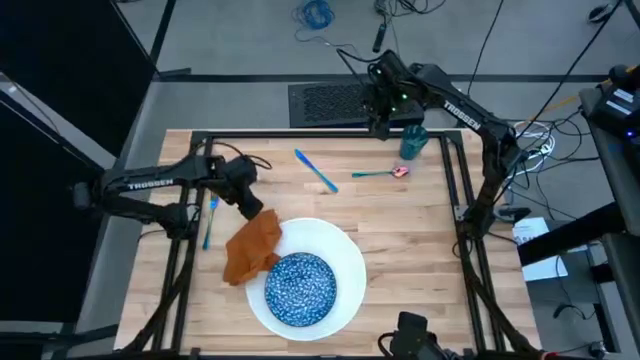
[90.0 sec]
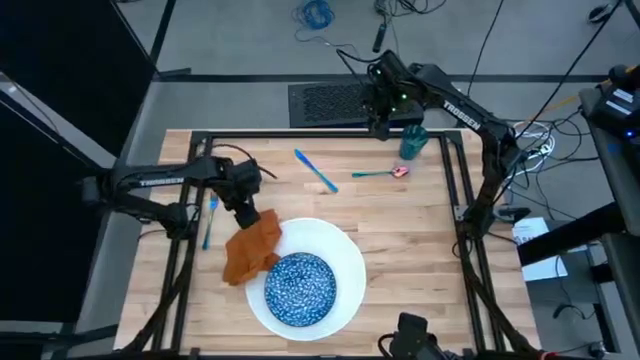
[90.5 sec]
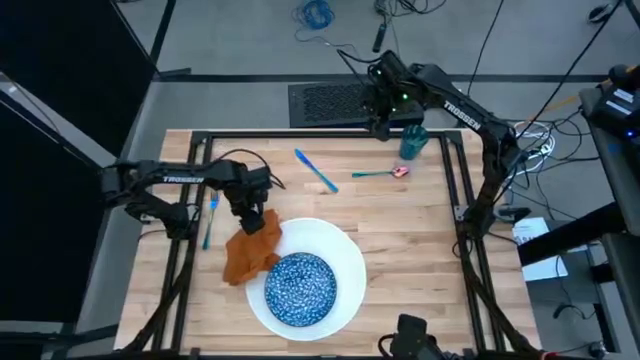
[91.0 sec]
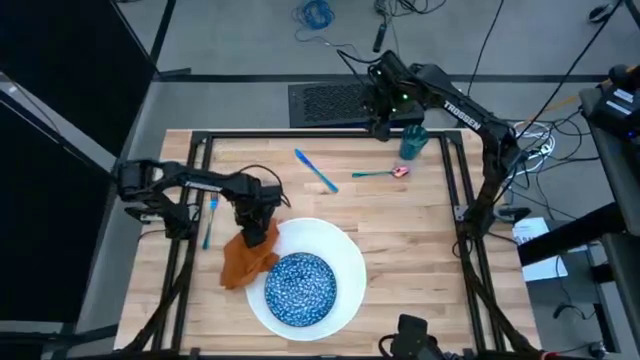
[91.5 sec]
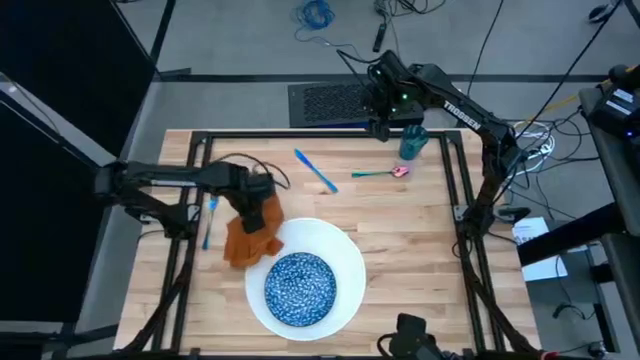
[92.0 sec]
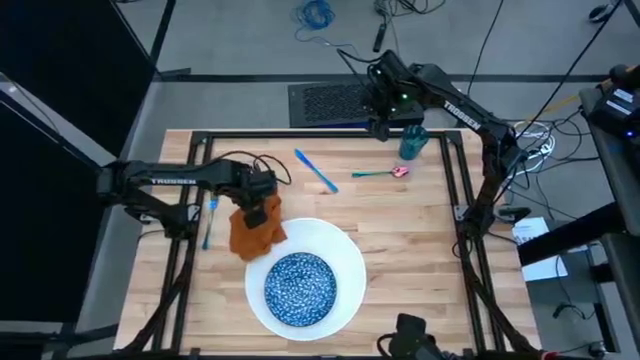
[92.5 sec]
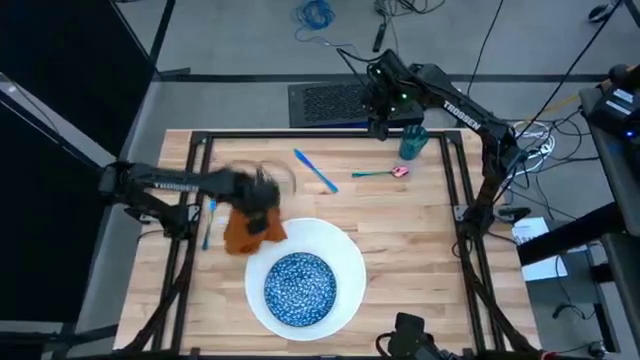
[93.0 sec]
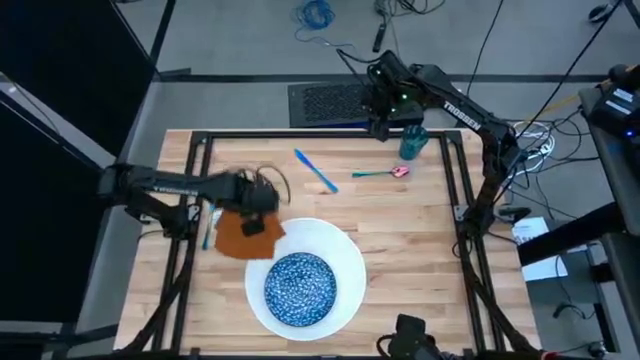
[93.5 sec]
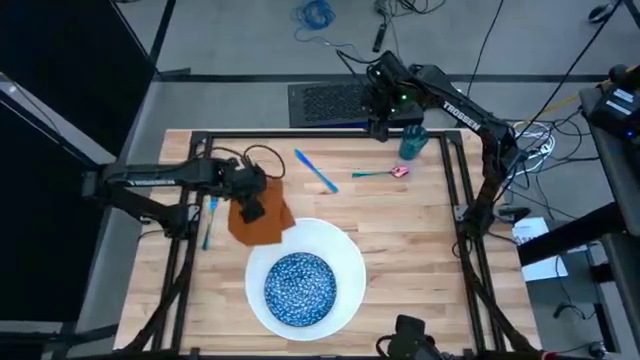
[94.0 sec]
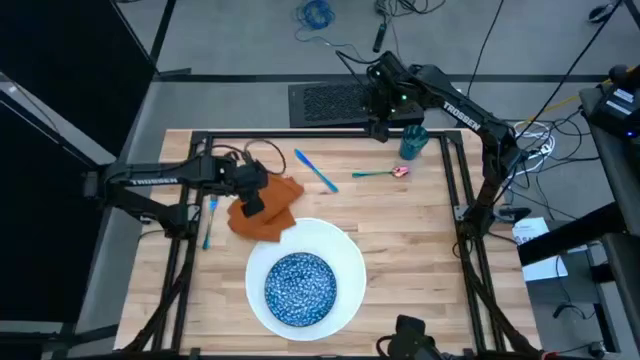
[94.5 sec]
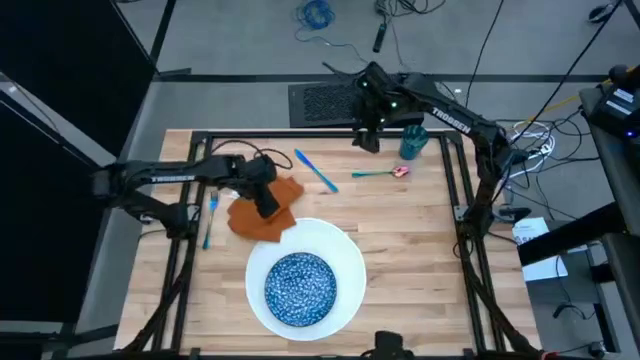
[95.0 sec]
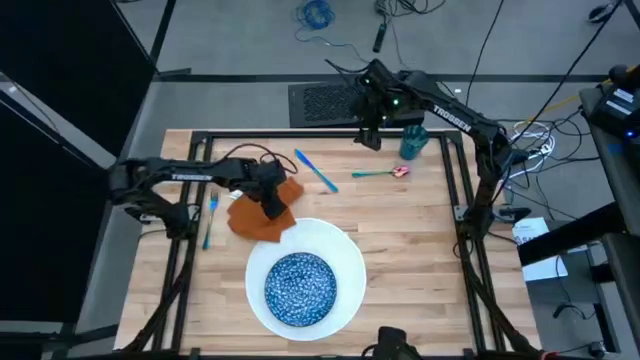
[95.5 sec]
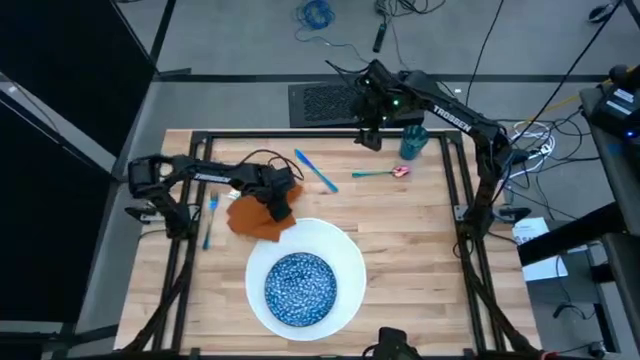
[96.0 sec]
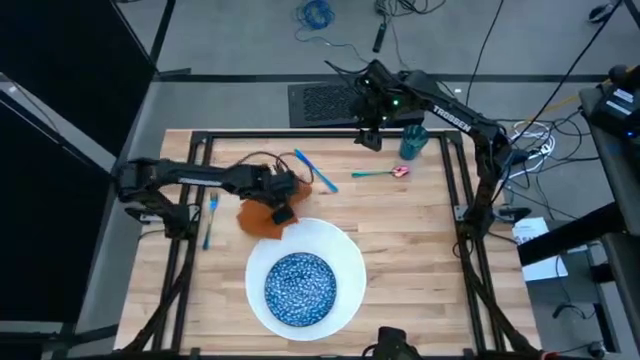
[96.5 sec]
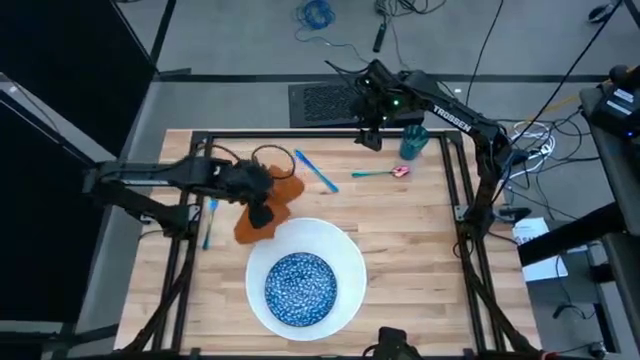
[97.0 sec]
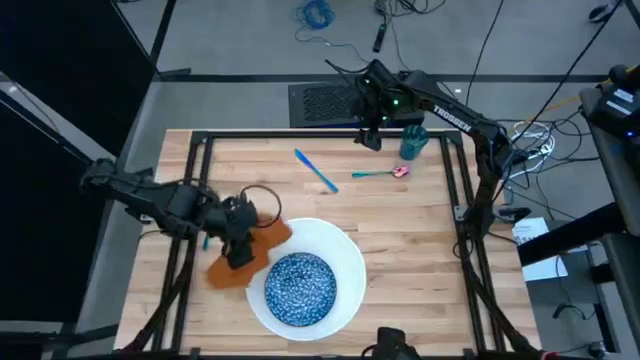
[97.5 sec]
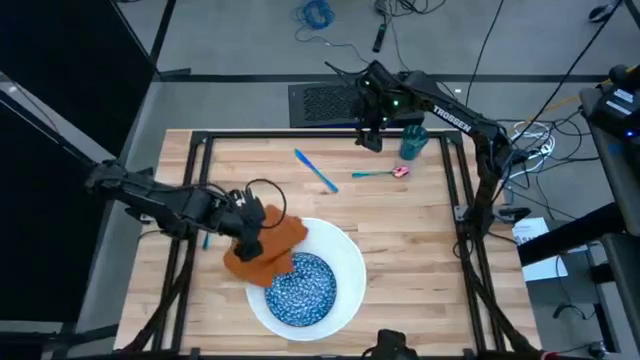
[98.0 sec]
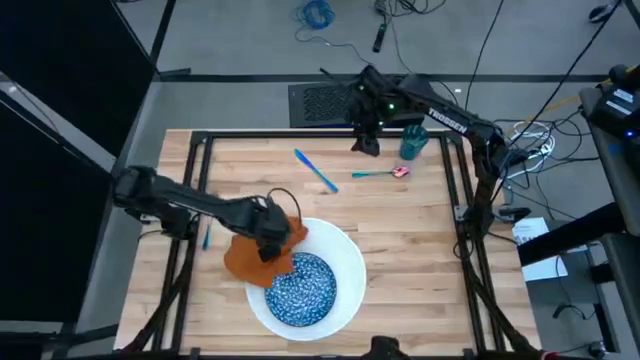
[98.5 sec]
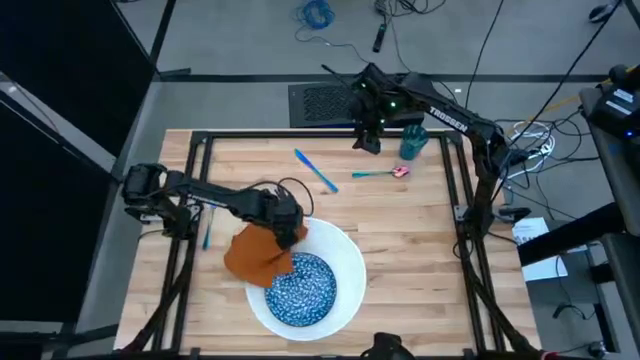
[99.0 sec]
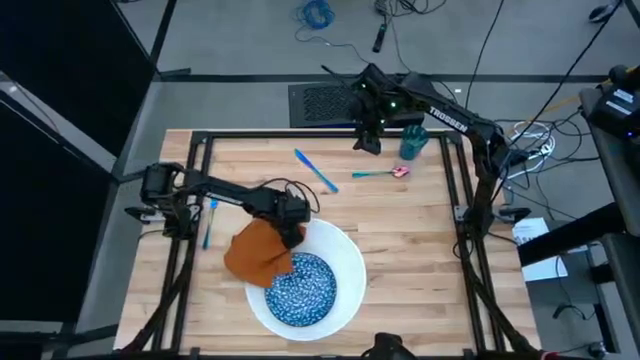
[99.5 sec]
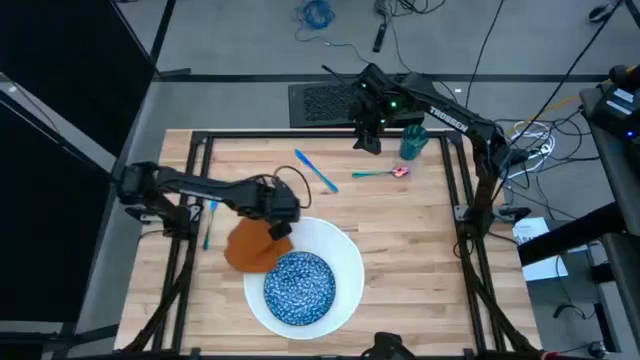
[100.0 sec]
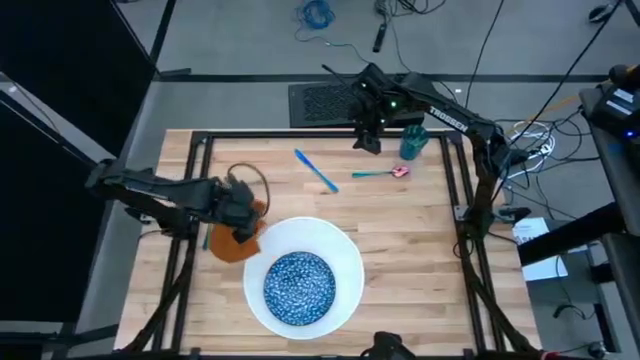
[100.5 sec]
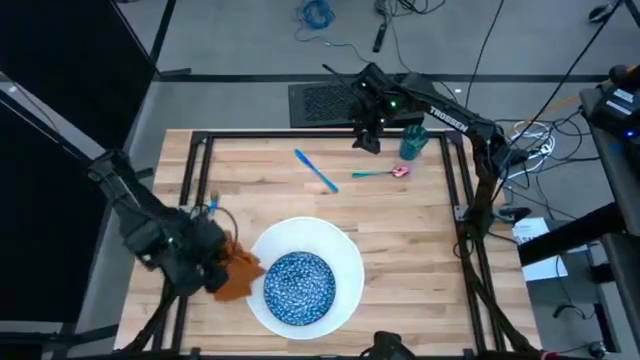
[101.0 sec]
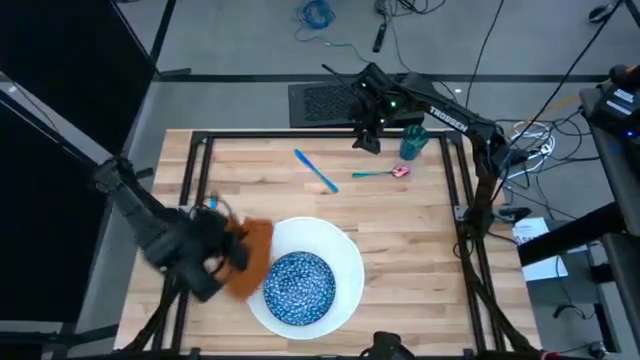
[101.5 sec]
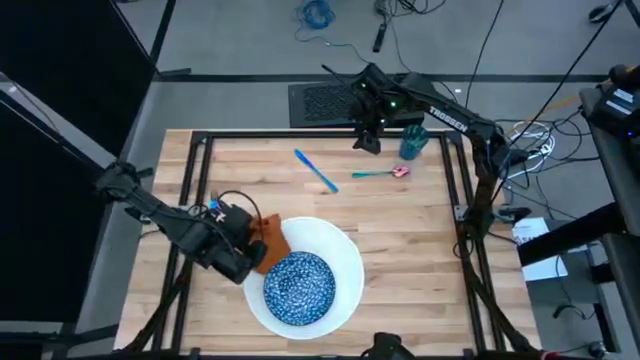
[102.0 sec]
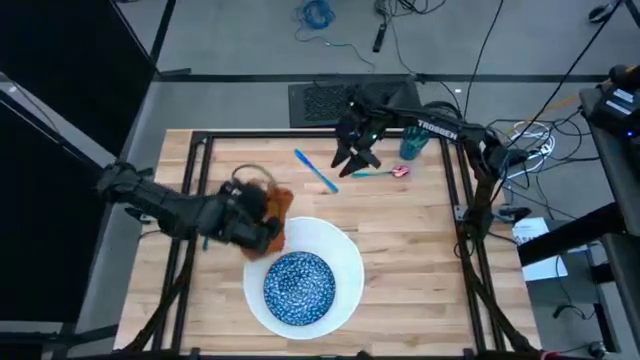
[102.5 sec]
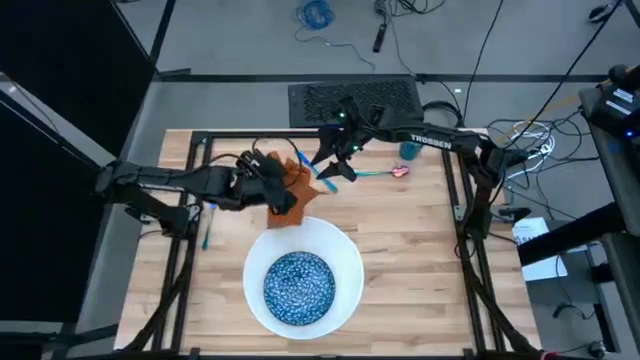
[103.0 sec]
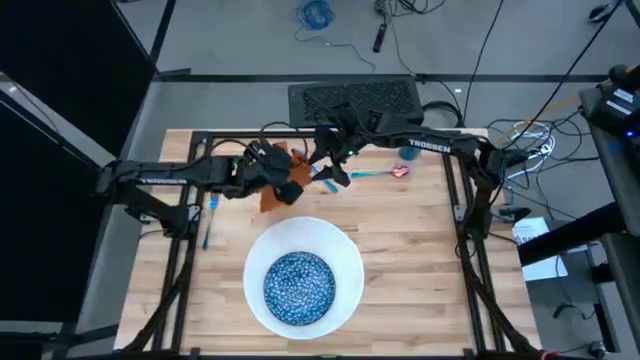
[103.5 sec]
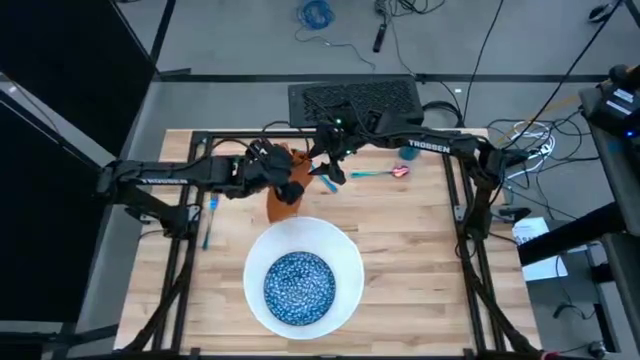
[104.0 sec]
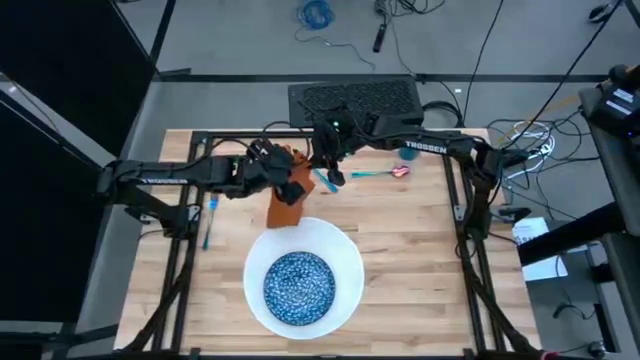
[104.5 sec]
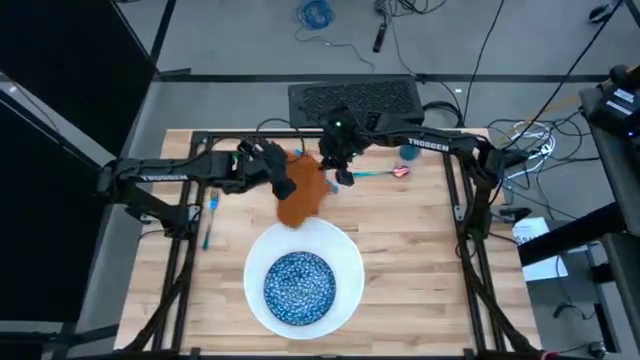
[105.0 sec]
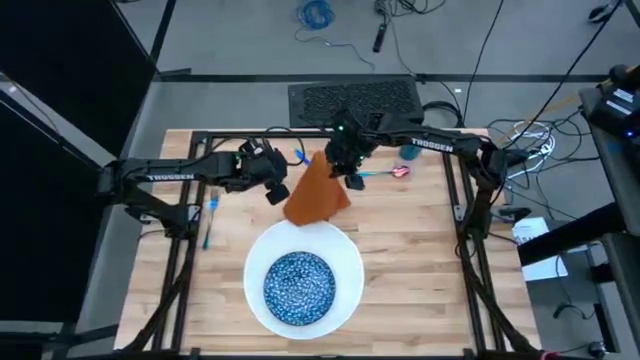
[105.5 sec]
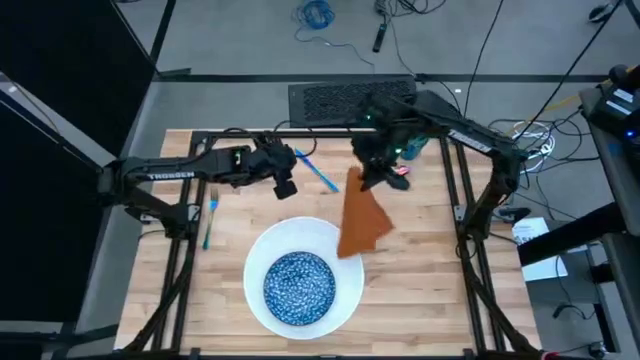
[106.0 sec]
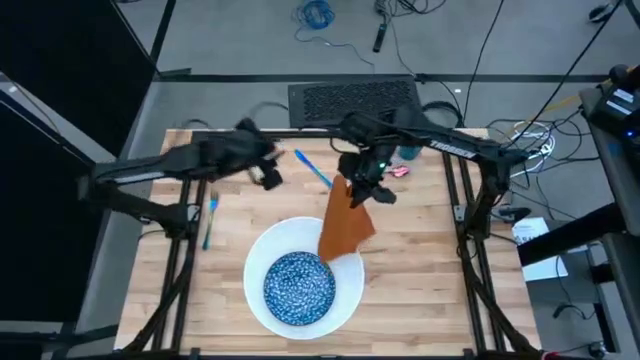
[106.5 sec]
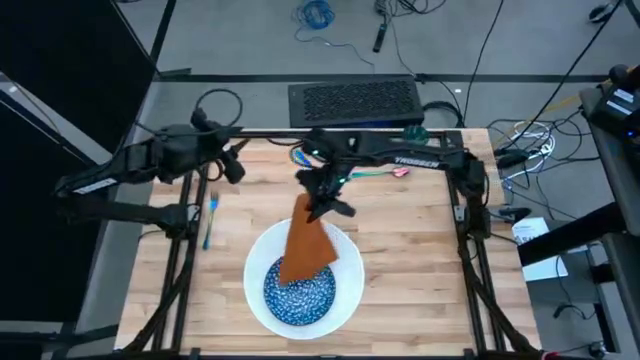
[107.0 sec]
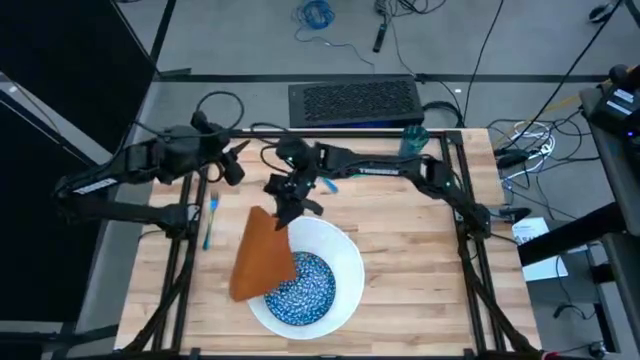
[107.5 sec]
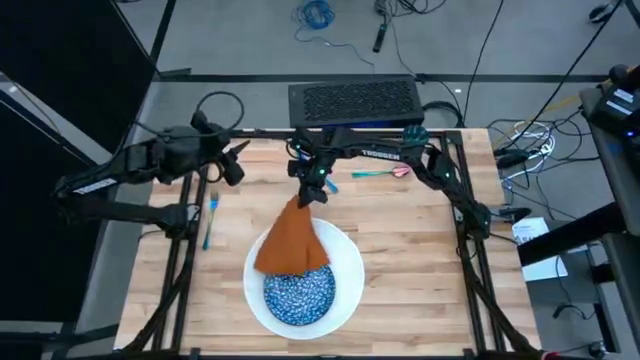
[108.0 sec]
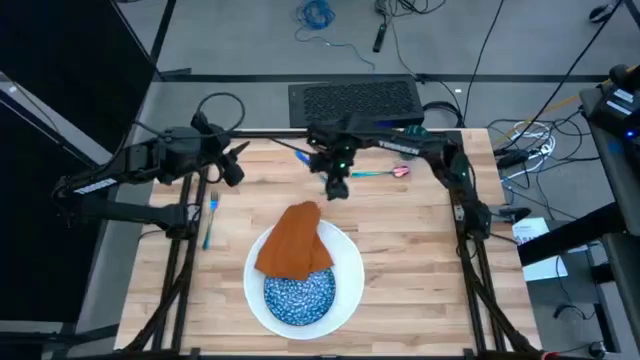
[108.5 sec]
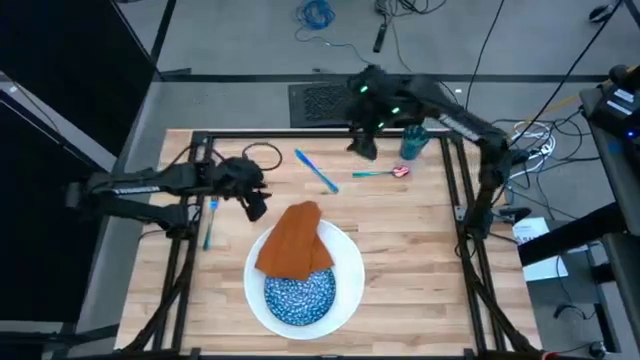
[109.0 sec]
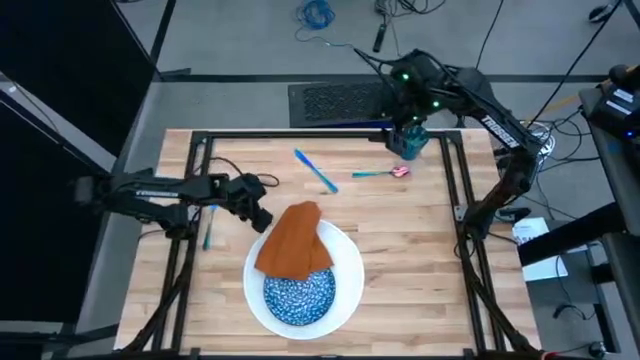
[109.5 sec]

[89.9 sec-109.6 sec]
Task: Set table place
Fold the orange table napkin

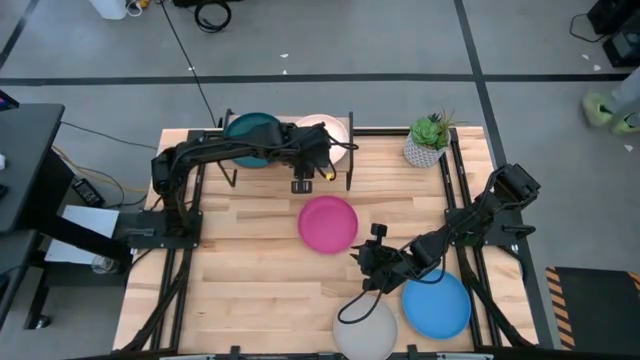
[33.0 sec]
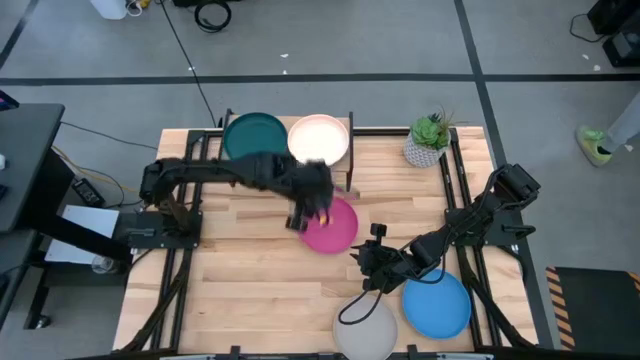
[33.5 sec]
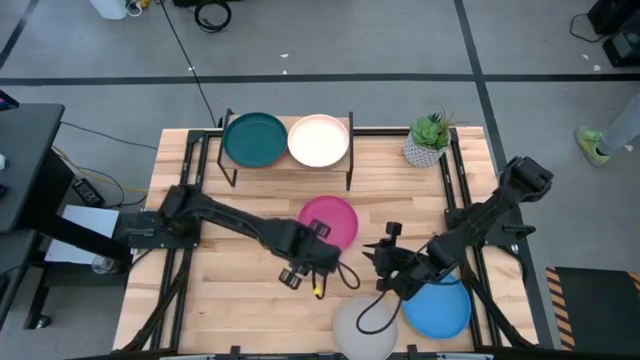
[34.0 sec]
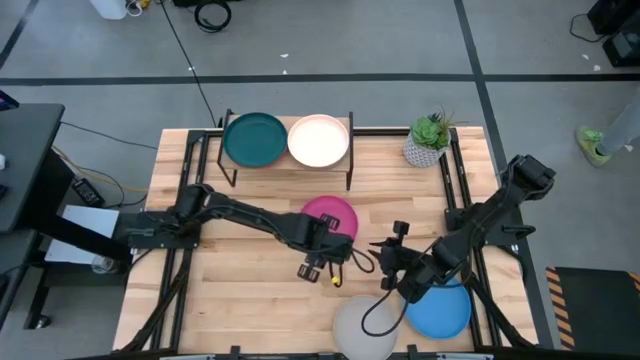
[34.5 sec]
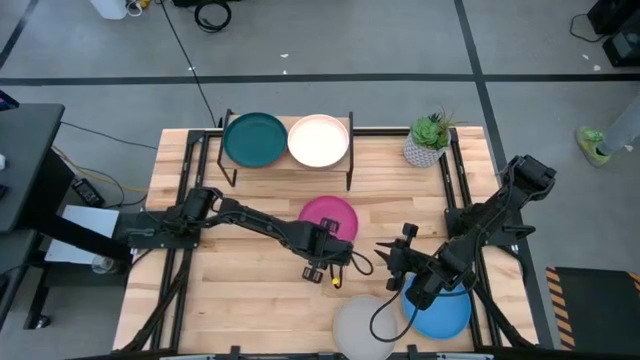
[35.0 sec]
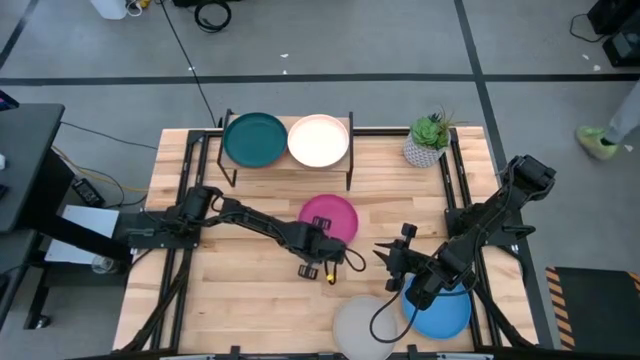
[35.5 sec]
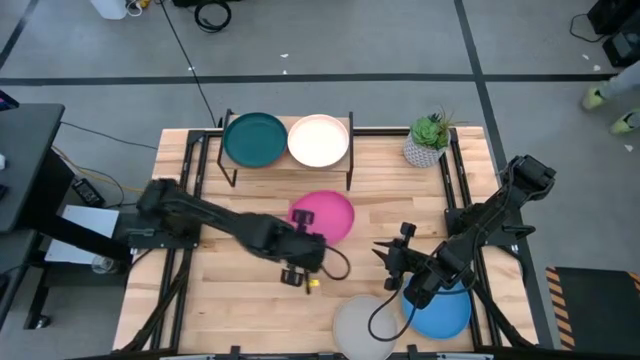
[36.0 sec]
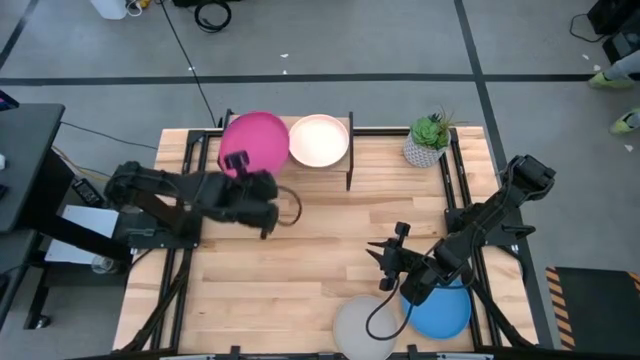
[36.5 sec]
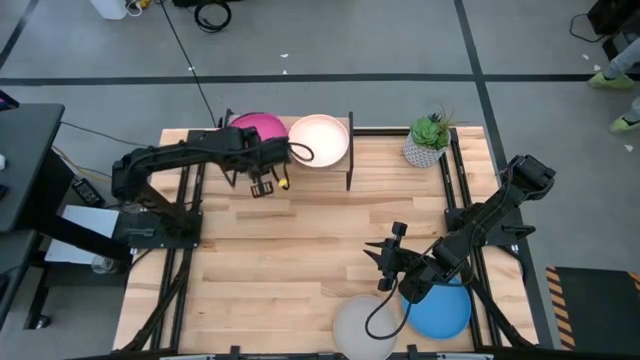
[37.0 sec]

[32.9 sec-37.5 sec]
Task: Place and stack plates onto a shelf
Stack the pink plate on top of the dark blue plate on the shelf
